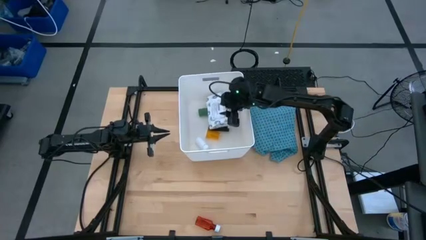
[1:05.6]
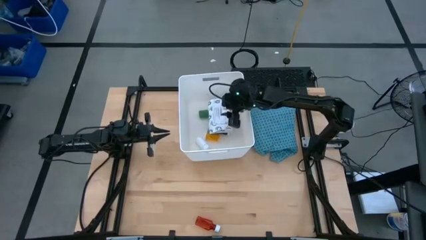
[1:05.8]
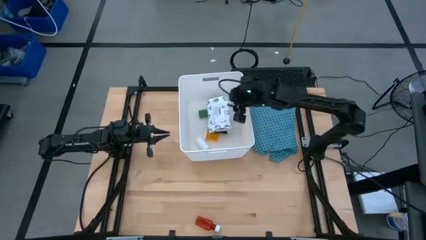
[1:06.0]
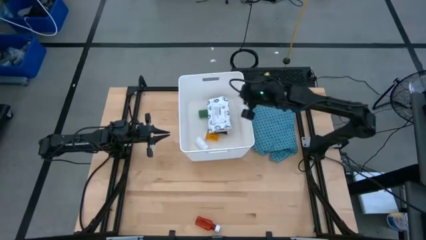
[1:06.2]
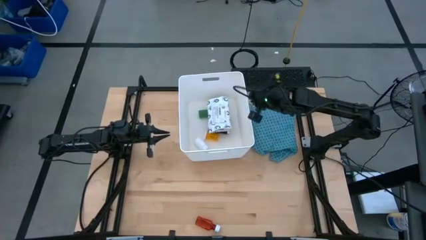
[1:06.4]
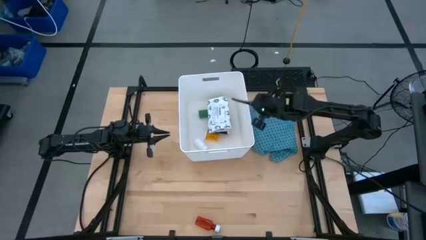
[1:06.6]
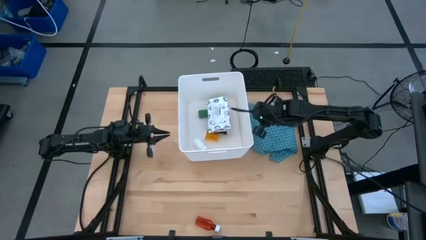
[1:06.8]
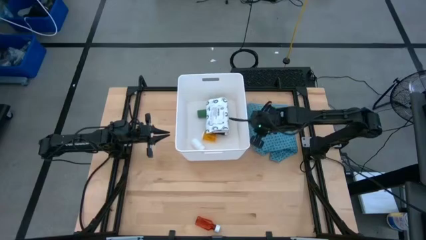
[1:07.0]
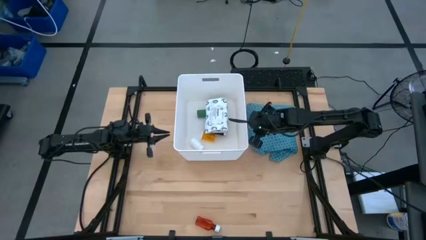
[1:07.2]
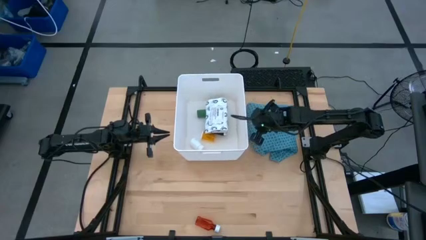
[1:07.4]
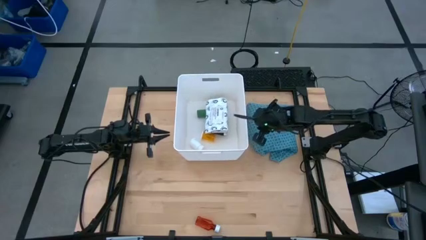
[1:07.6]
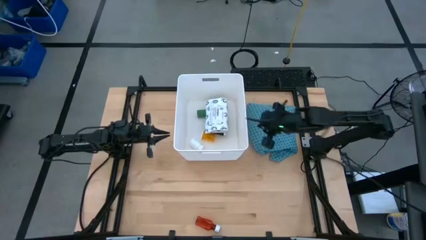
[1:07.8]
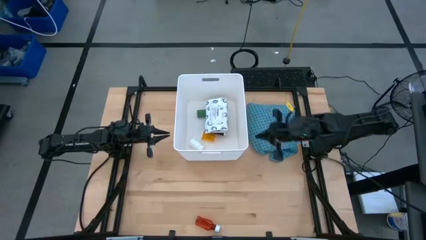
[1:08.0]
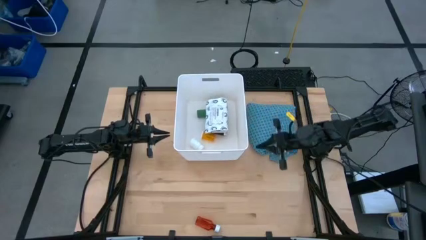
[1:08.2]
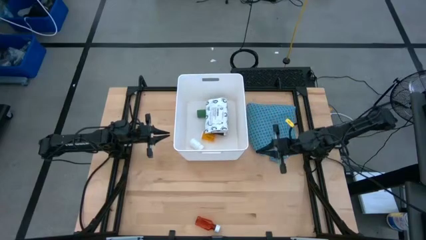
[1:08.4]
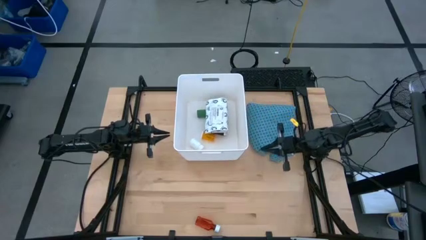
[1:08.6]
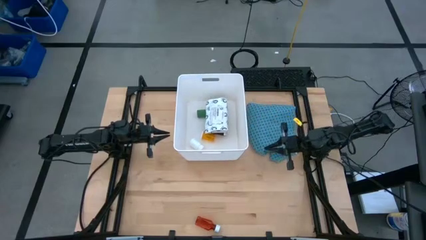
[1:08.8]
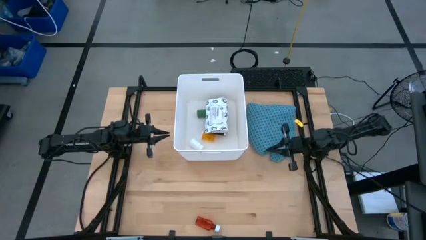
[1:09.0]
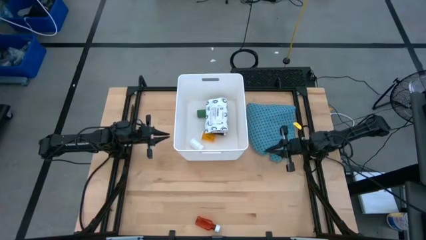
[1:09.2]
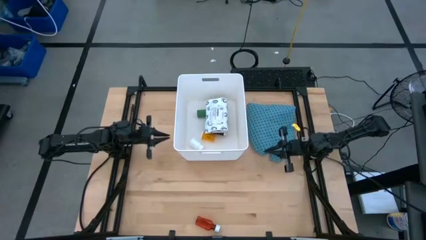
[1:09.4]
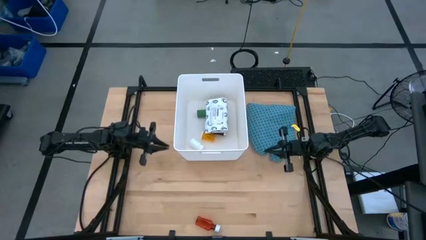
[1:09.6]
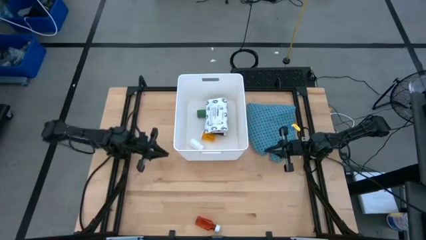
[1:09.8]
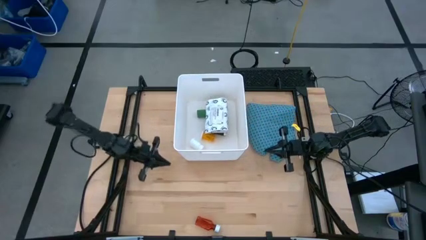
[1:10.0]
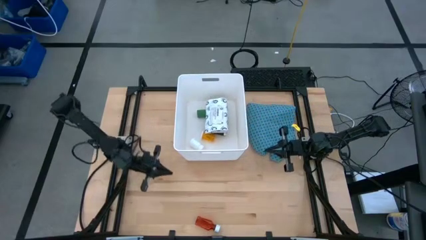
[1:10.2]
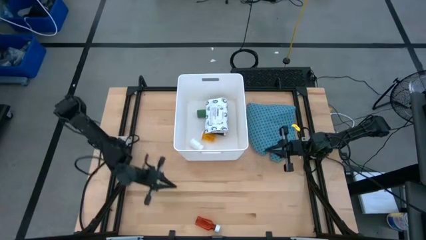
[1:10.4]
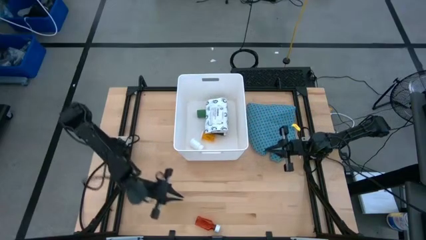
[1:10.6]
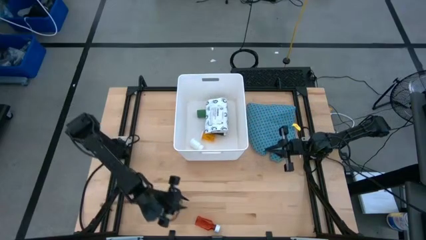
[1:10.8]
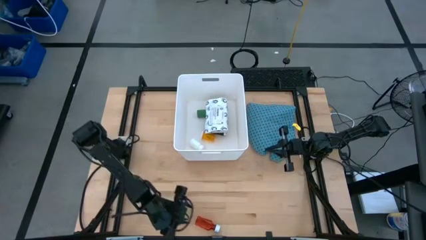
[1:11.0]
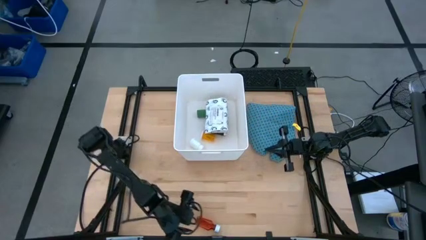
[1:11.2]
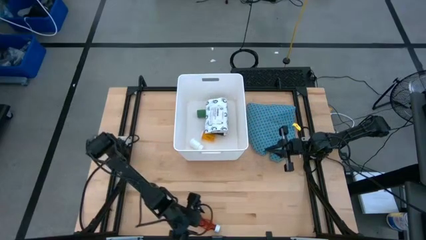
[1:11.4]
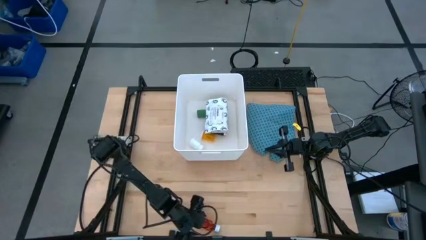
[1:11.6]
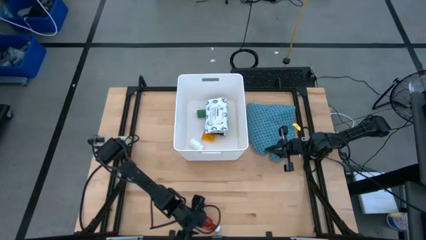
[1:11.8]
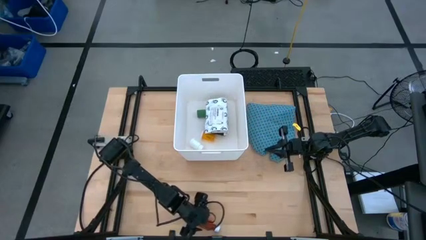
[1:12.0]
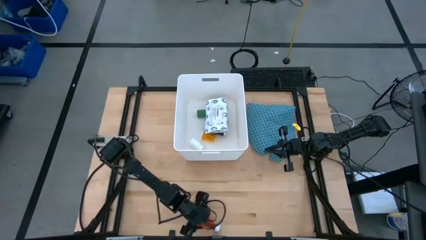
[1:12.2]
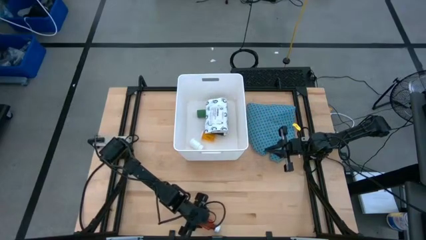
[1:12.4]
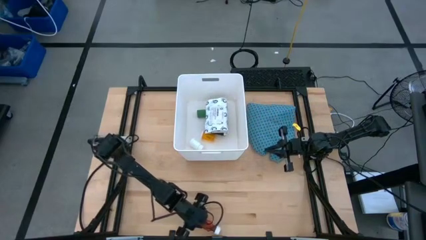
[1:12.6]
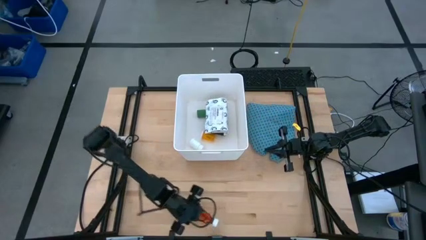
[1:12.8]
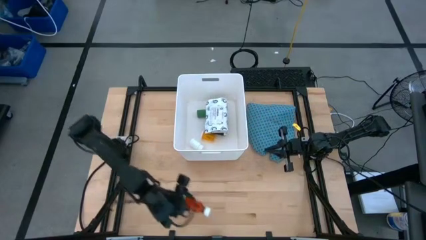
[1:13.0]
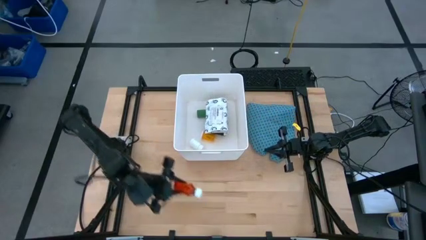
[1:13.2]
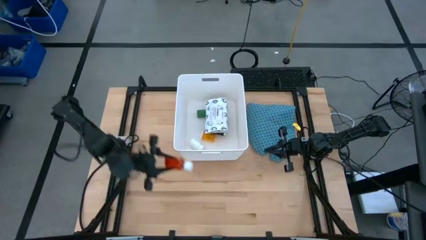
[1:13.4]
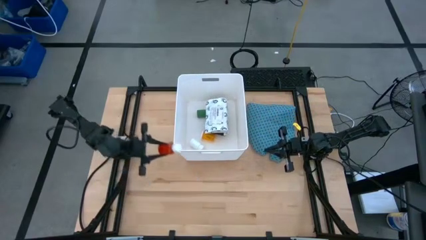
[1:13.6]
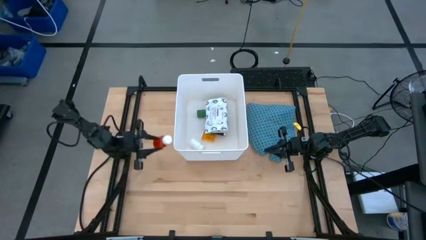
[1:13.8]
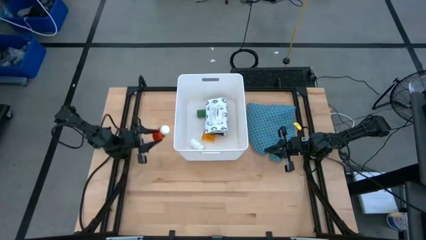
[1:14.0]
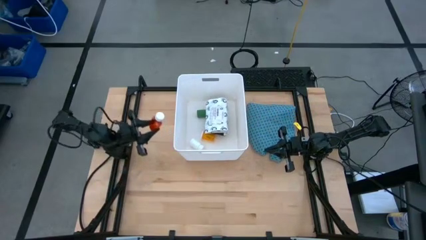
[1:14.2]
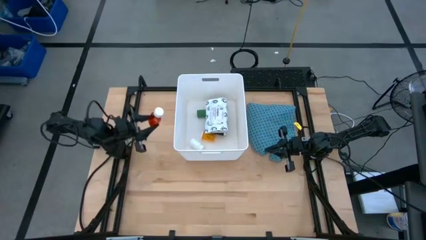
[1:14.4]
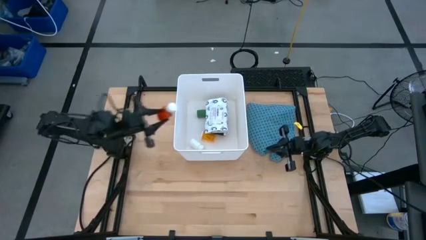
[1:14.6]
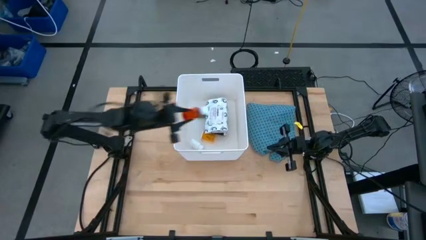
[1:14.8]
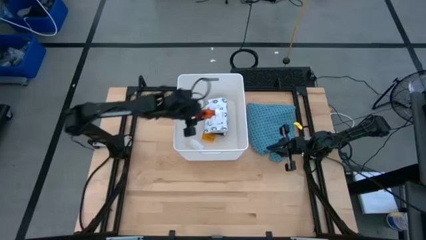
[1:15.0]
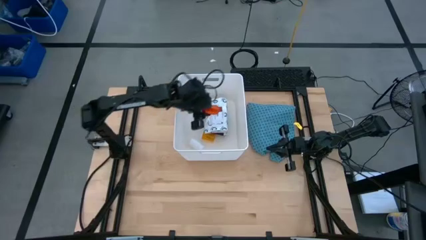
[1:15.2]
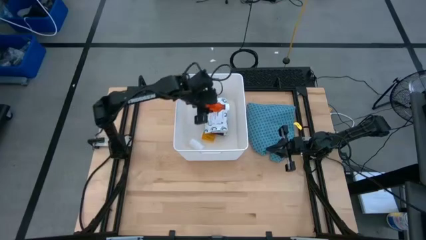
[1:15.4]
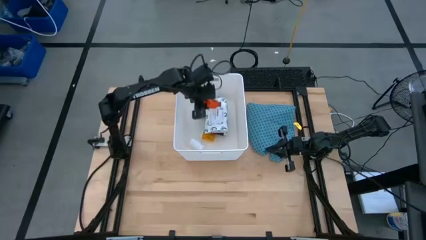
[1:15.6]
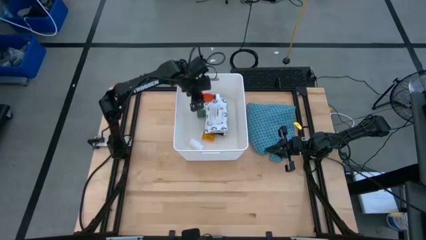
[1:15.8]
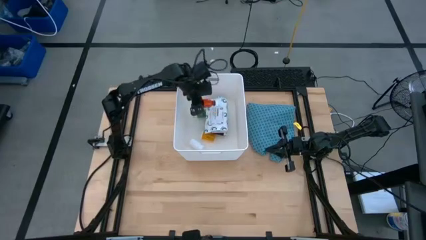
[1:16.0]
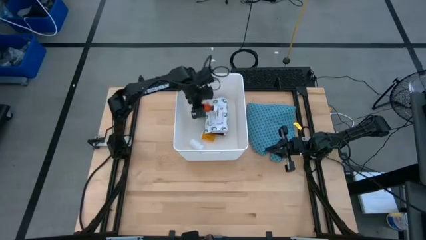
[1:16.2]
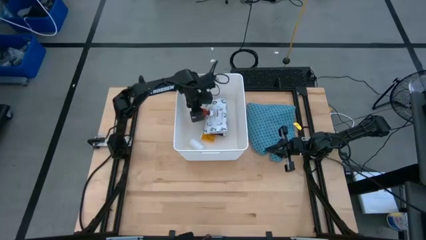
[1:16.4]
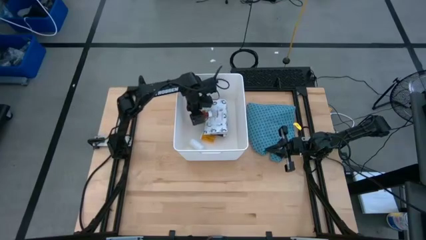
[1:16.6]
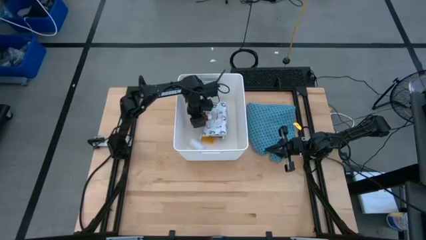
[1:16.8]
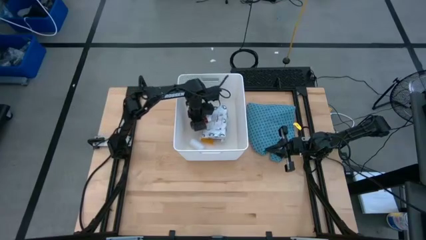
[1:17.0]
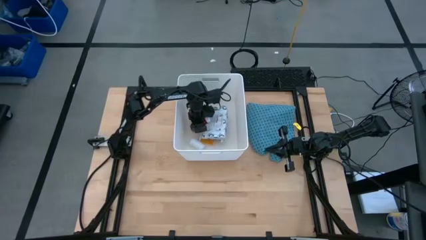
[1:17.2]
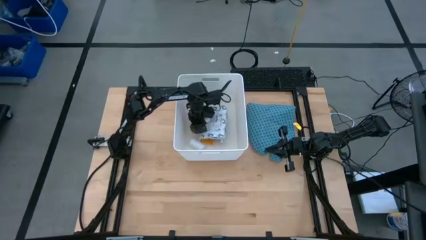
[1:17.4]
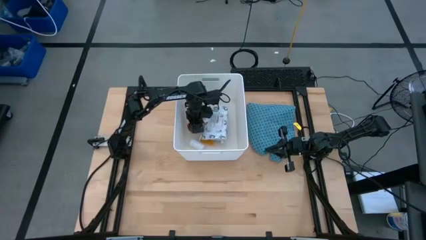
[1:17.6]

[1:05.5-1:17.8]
Task: Pick & place medical supplies in basket/bin
Put the red pill bottle into the white bin

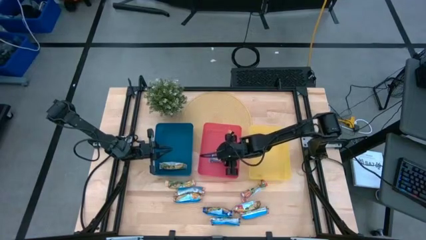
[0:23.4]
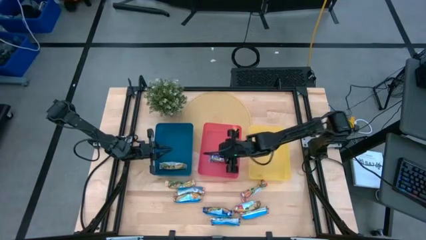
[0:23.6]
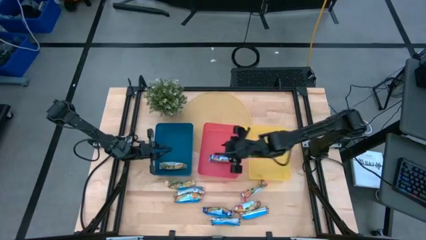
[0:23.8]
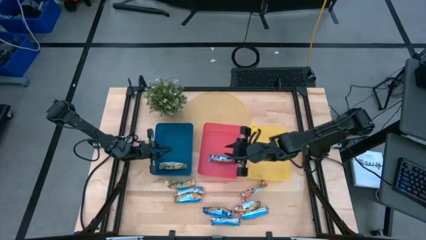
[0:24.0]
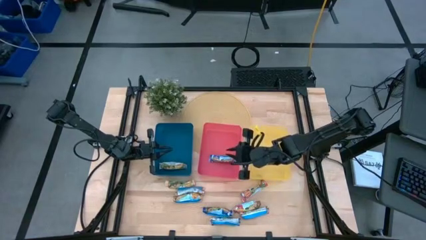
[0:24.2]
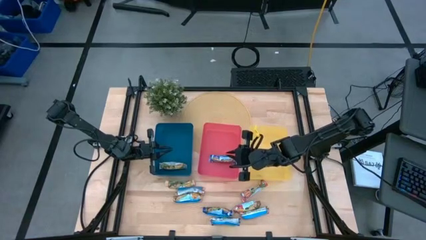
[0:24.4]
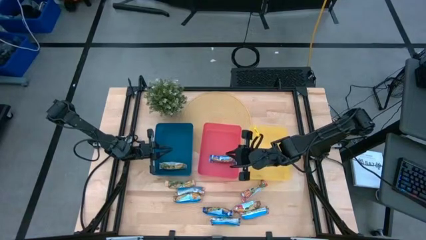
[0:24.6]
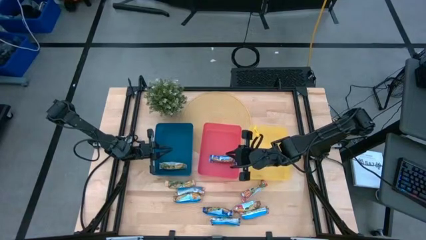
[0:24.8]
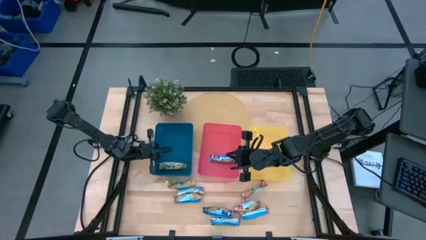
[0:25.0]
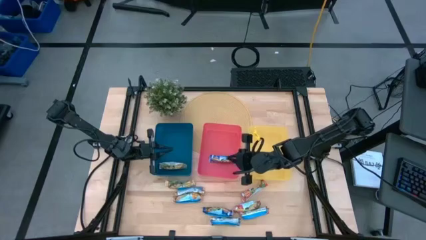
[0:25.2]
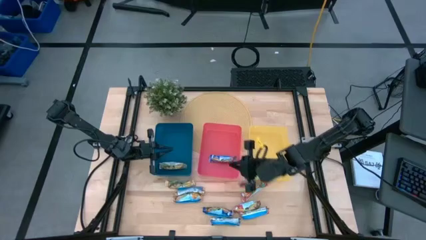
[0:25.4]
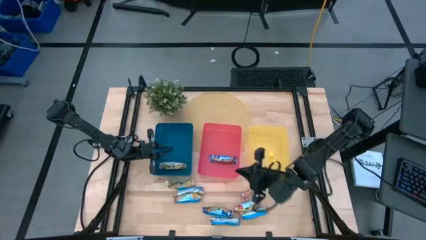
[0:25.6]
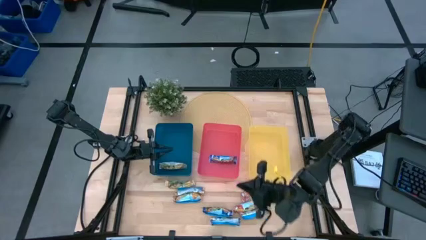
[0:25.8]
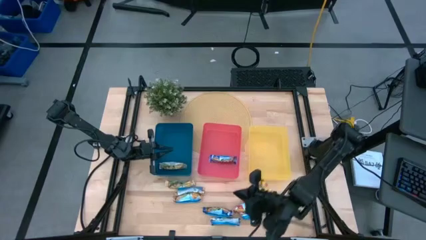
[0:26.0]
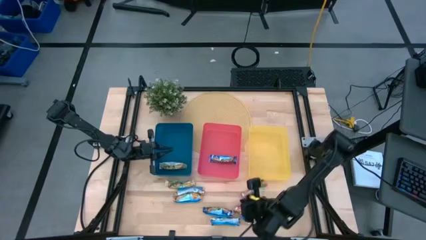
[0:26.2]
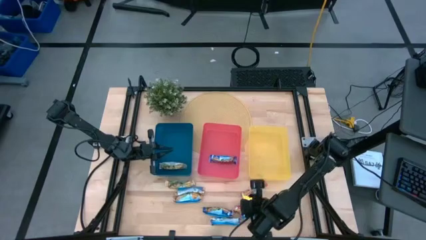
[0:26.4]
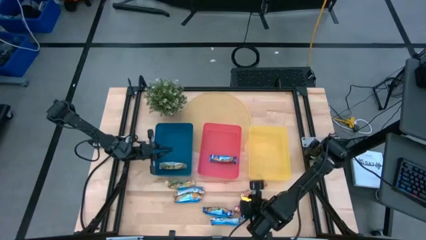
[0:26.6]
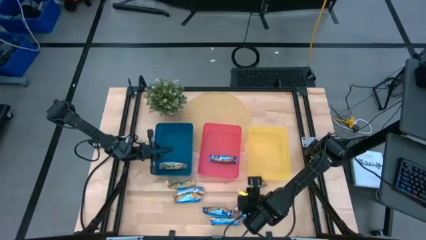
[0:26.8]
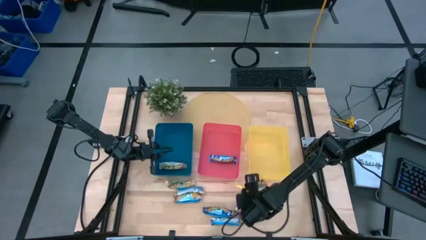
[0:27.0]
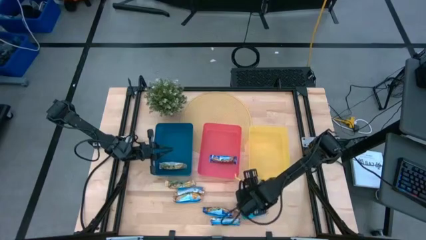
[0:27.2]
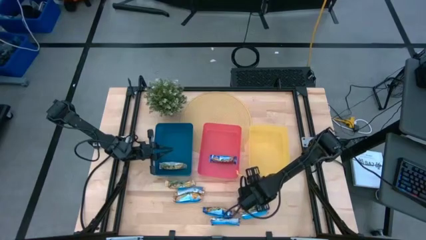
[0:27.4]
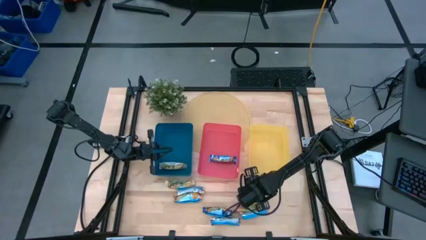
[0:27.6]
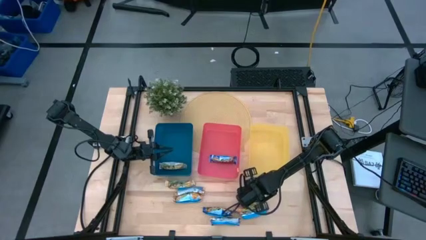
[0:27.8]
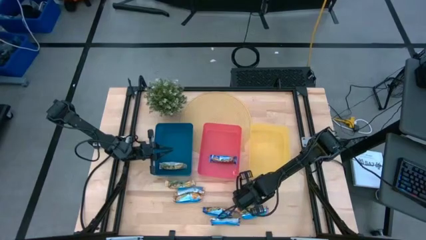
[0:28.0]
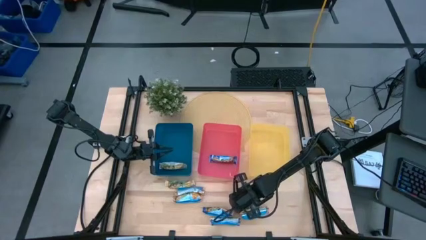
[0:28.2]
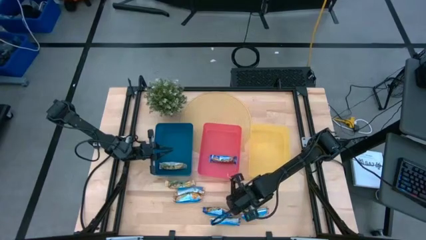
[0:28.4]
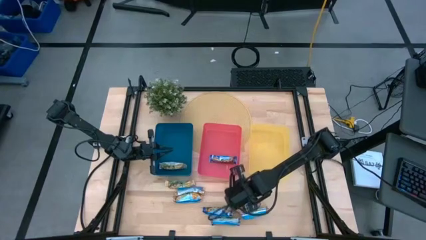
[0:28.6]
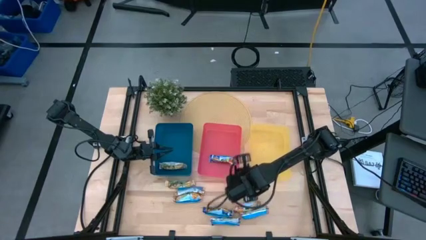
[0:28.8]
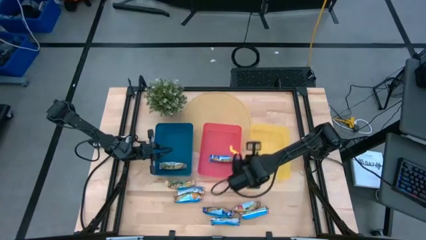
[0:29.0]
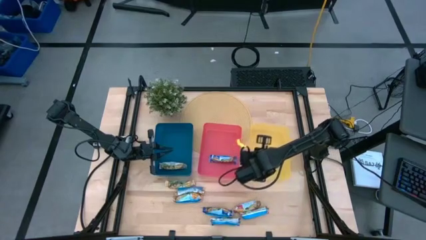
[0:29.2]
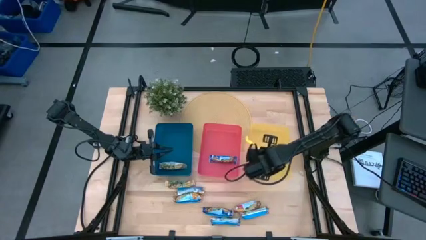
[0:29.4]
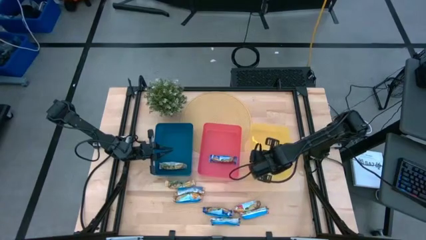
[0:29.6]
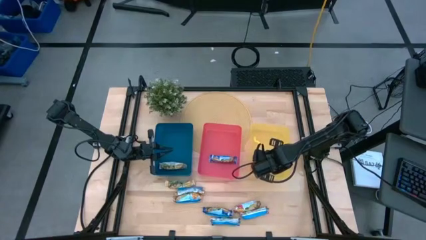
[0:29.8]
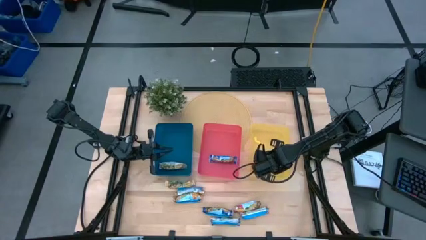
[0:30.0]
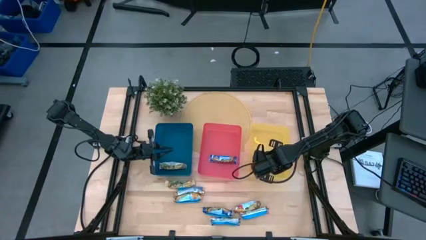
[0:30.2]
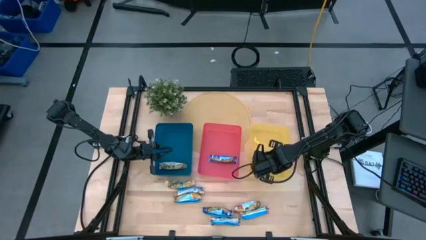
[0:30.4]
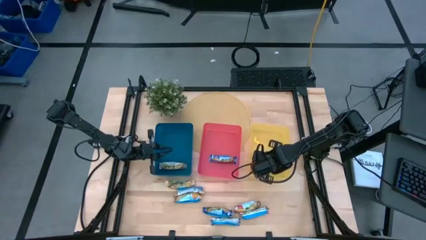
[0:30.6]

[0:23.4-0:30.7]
Task: Pick and place Granola Bars by type
Put the top red granola bar into the yellow bin
